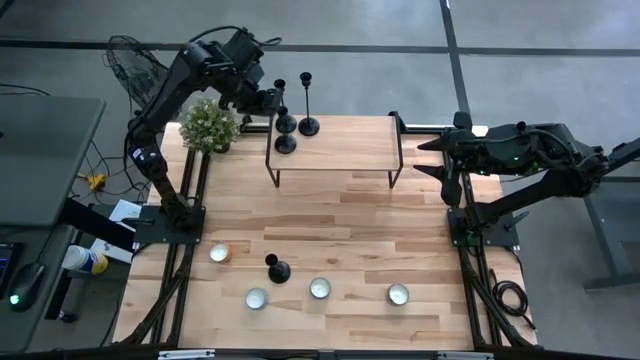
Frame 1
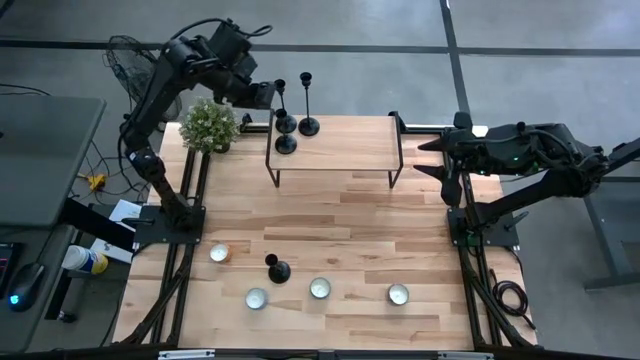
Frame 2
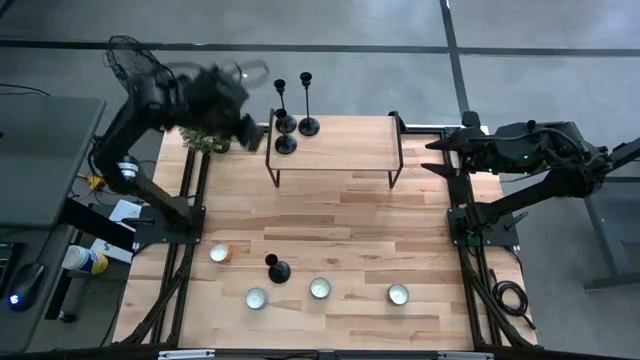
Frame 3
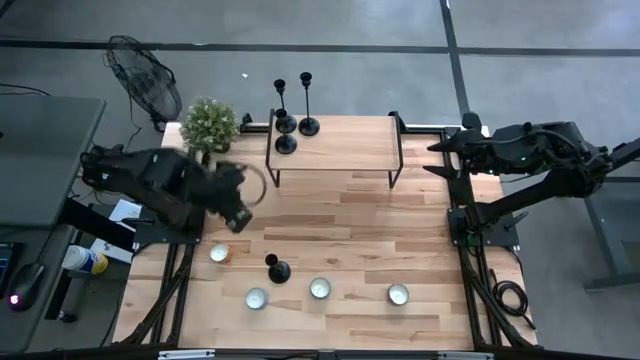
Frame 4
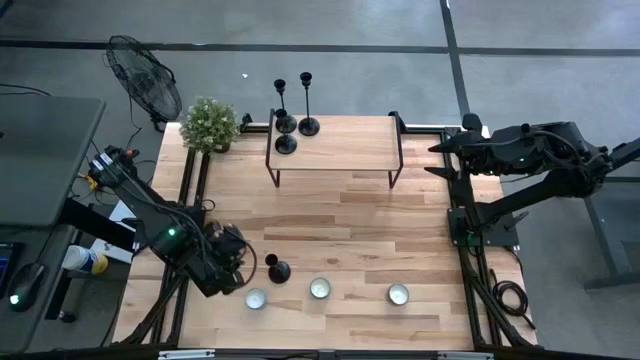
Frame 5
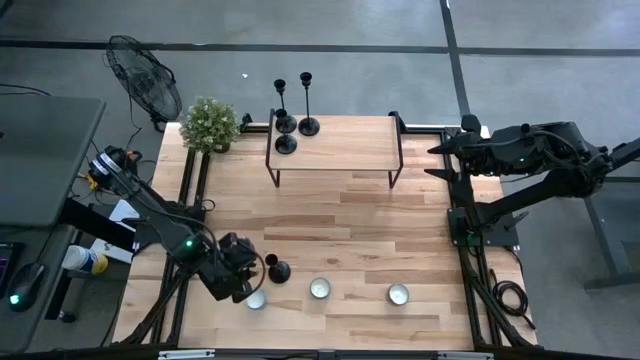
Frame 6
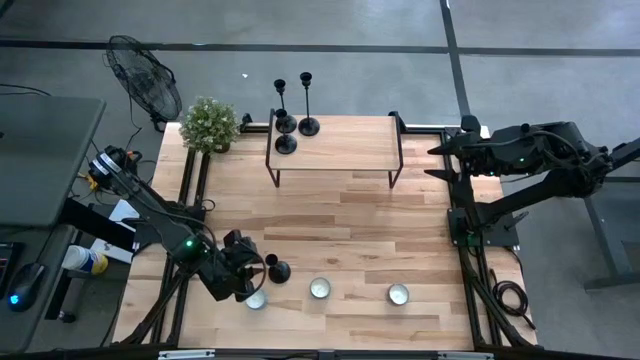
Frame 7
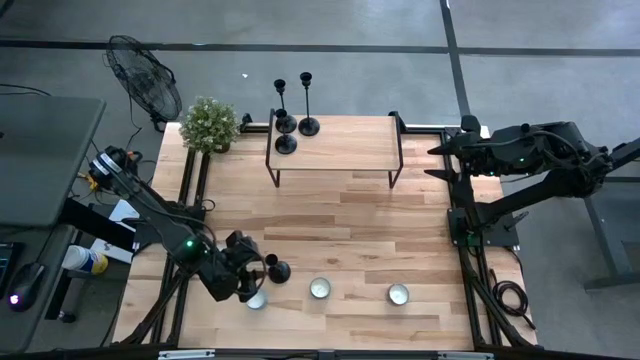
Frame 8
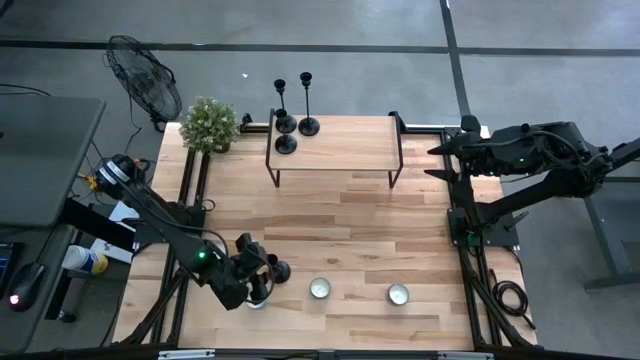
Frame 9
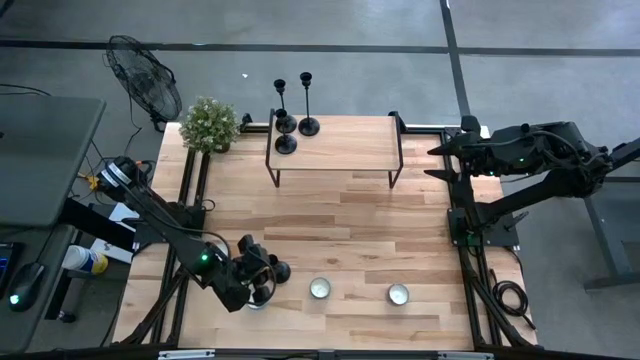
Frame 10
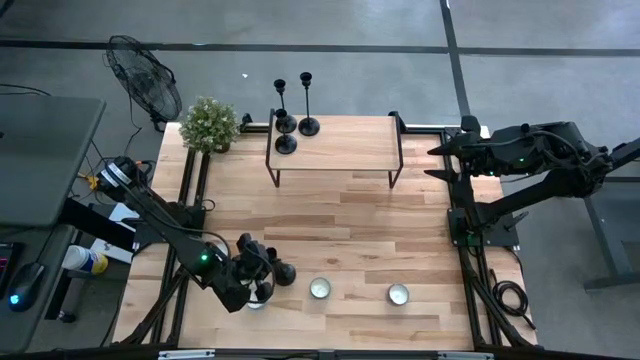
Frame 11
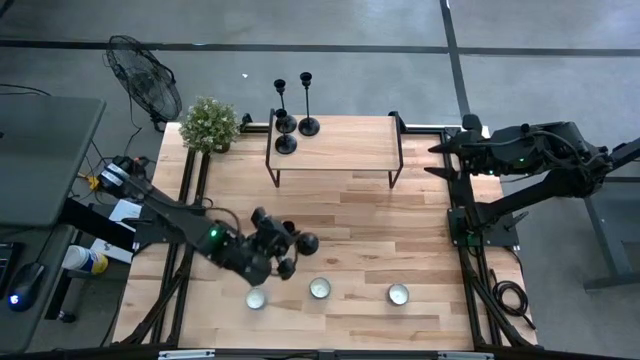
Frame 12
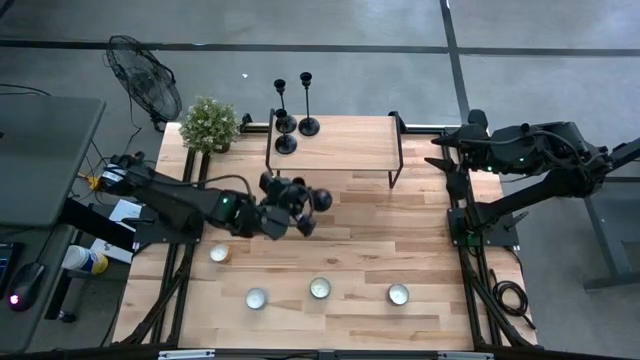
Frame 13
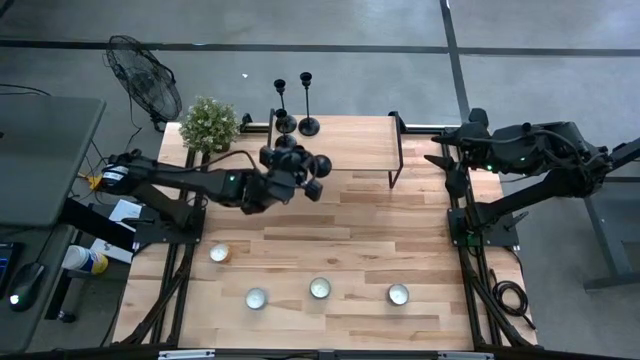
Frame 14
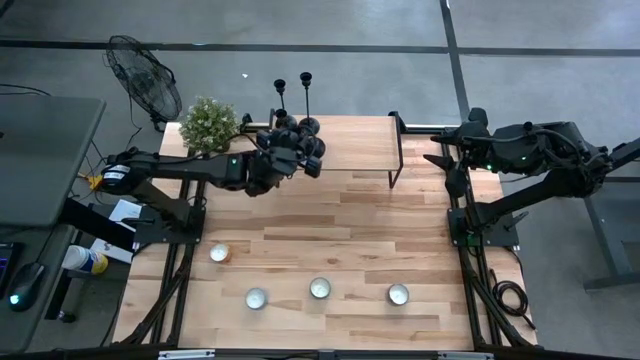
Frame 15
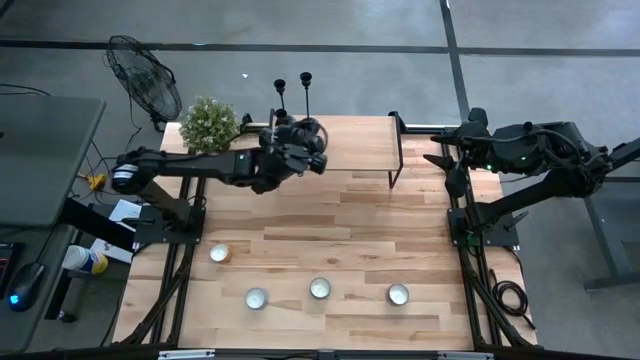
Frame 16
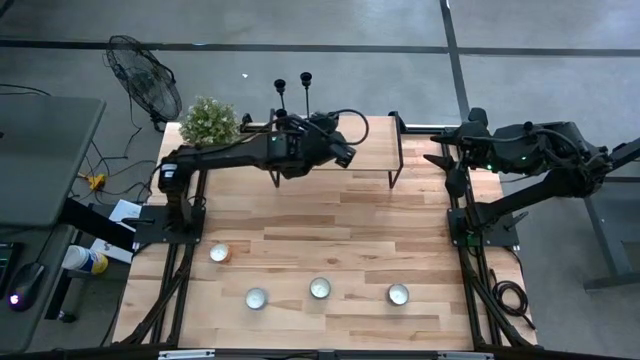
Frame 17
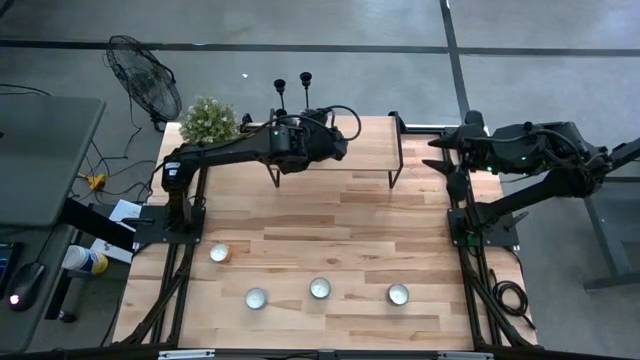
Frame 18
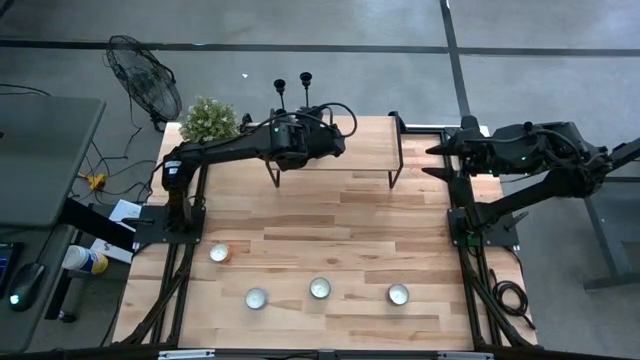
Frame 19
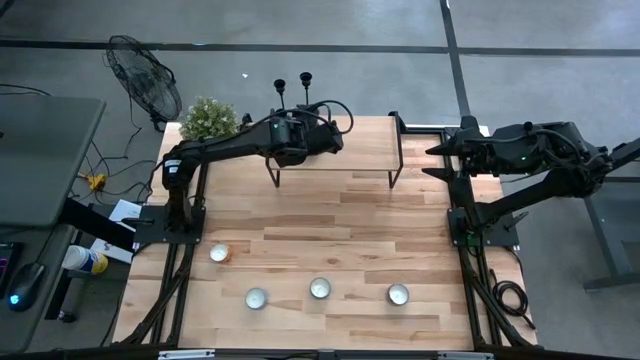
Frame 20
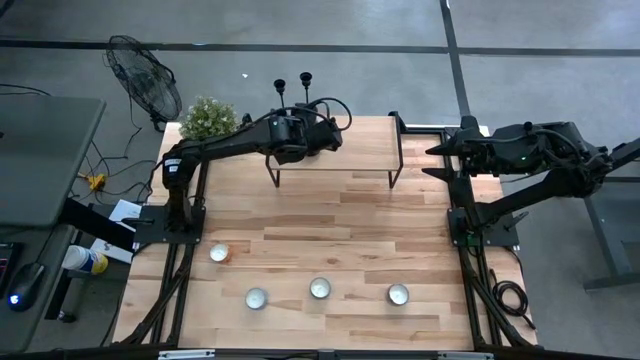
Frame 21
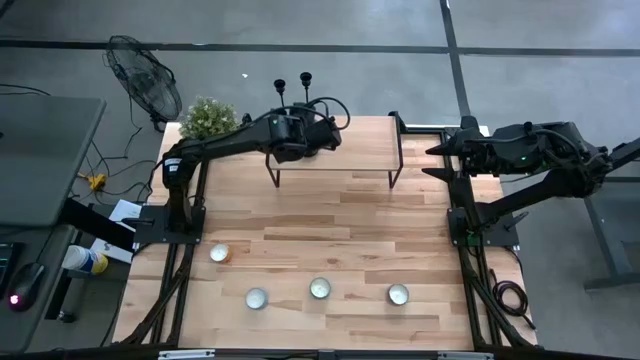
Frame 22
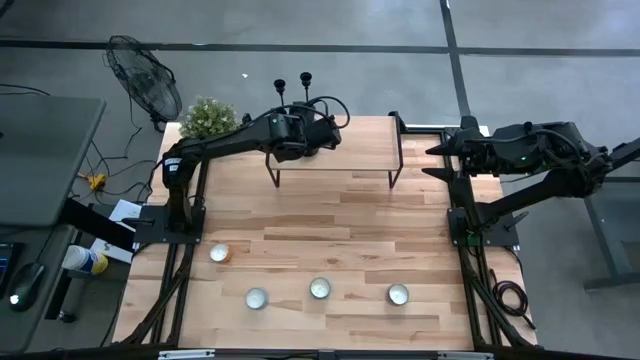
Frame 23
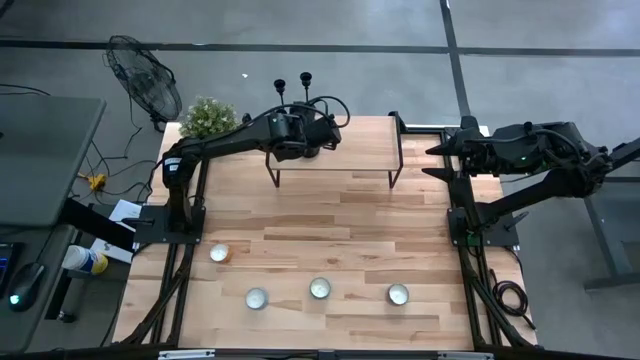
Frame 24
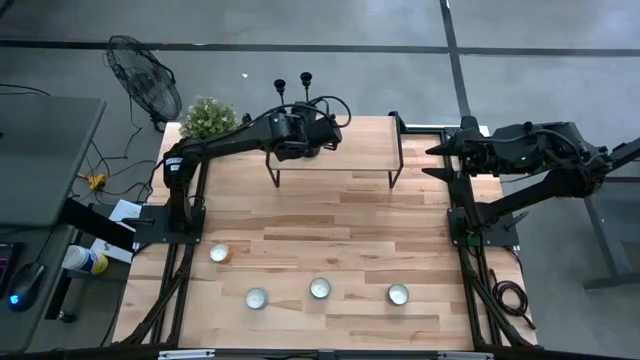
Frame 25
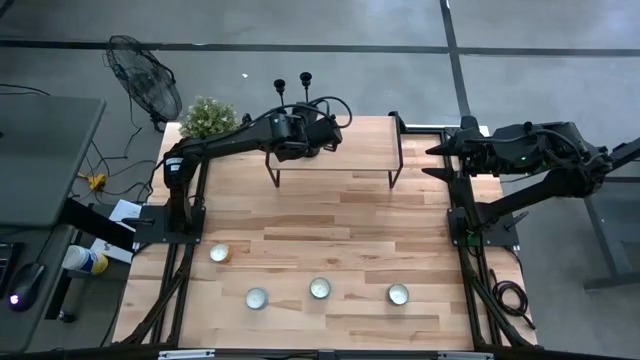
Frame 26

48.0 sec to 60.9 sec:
Task: Pick & Place candle stick holders
Put the black candle holder on the shelf

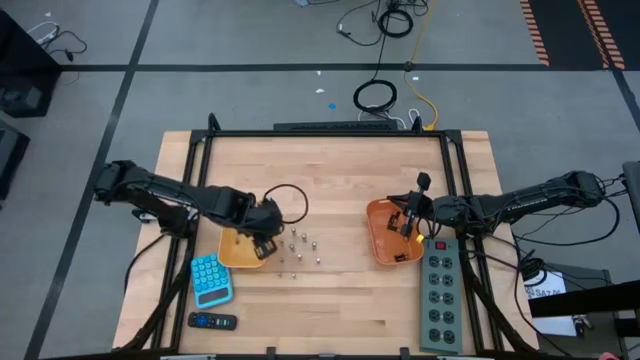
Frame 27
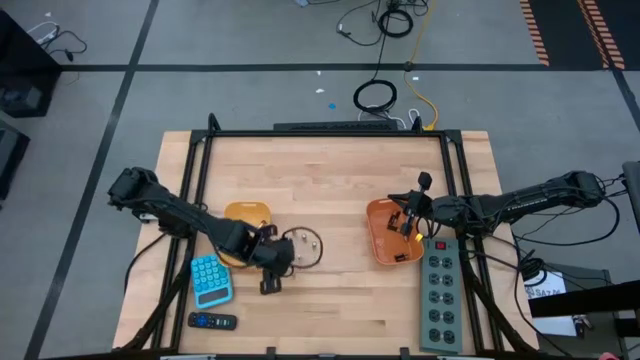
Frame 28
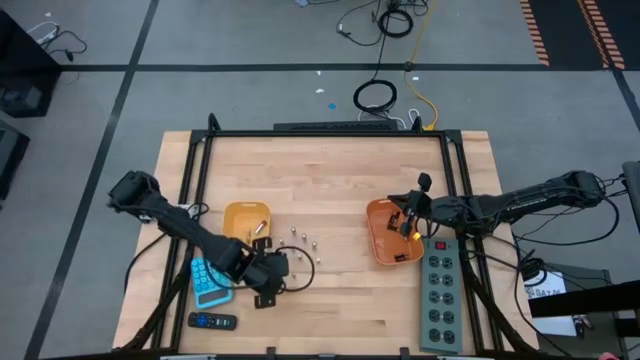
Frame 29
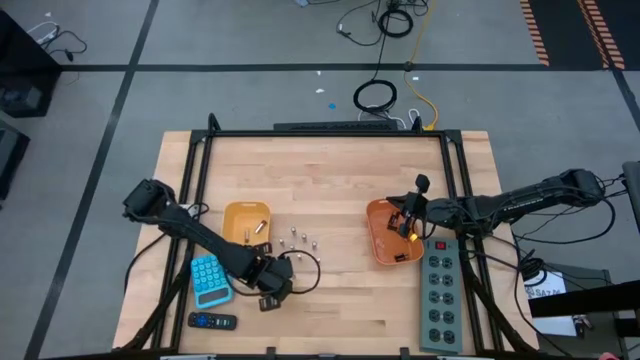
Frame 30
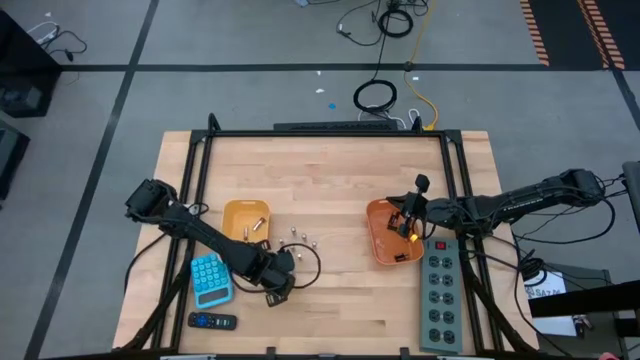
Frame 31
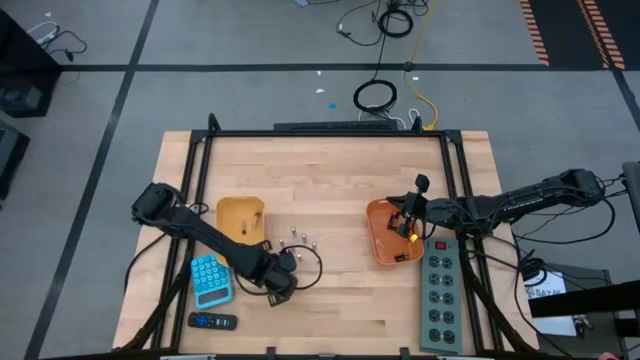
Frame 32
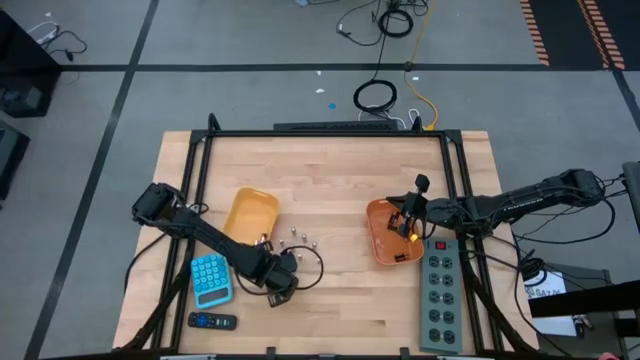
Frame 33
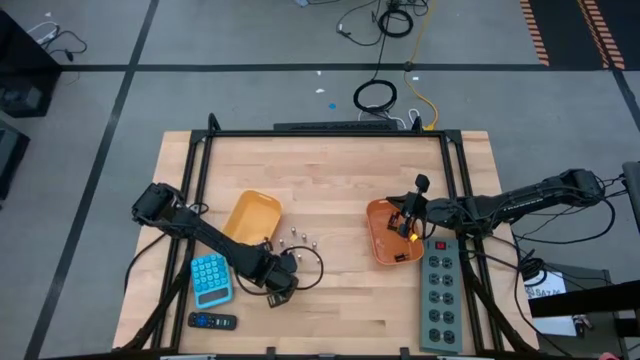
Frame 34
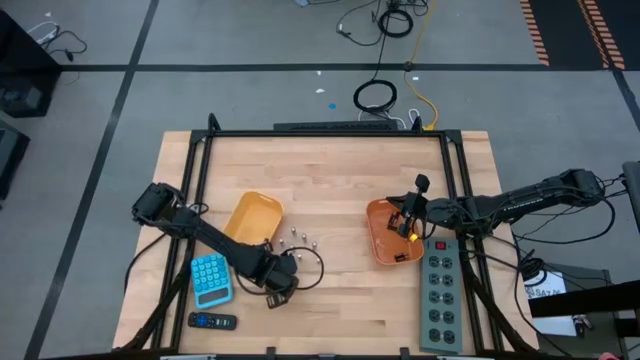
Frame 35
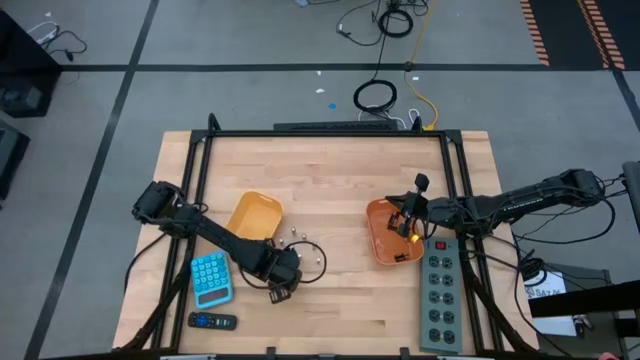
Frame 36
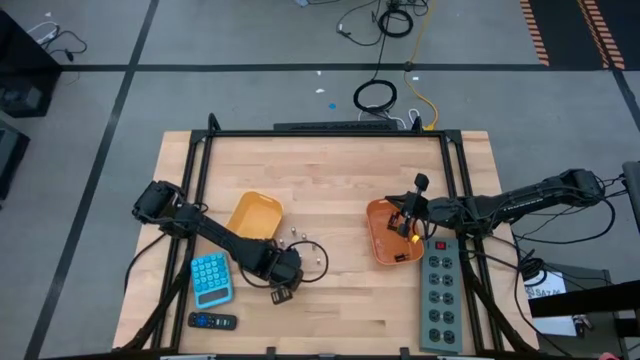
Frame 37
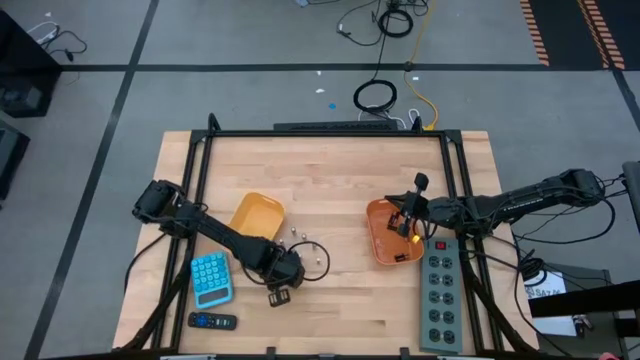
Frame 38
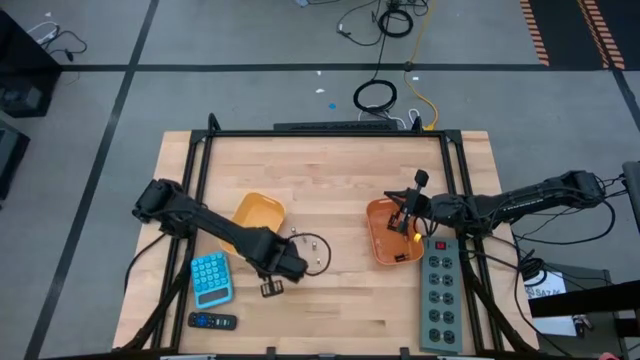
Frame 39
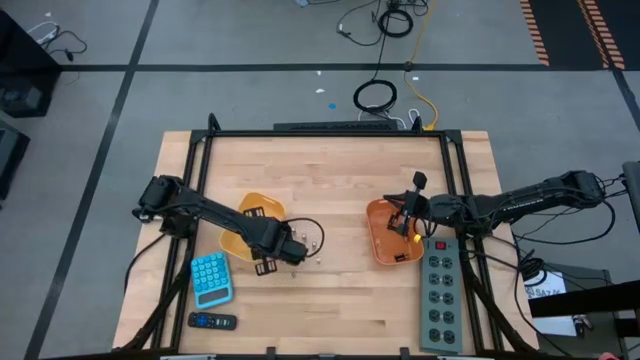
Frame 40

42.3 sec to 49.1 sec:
Task: Sort batteries
Put the silver battery into the yellow bin

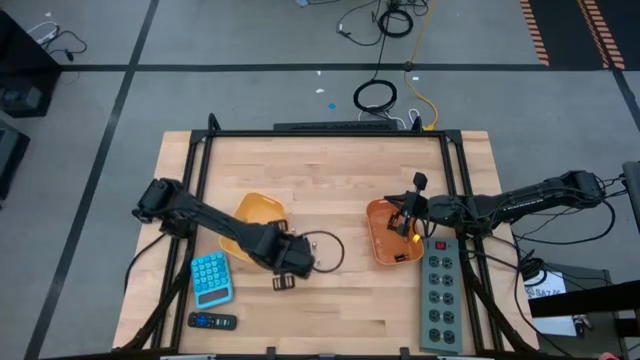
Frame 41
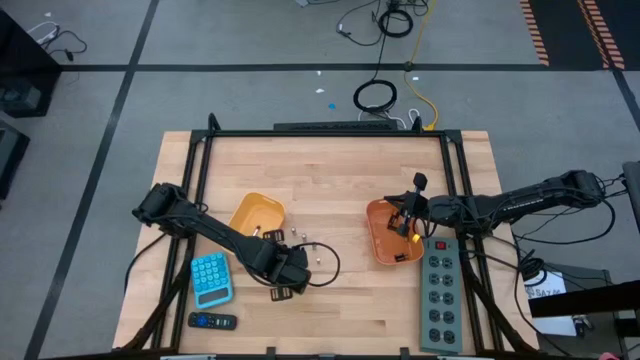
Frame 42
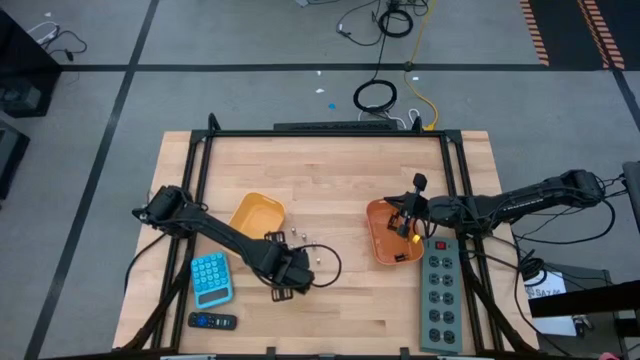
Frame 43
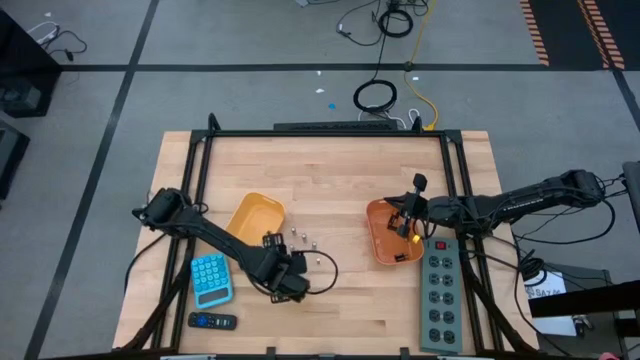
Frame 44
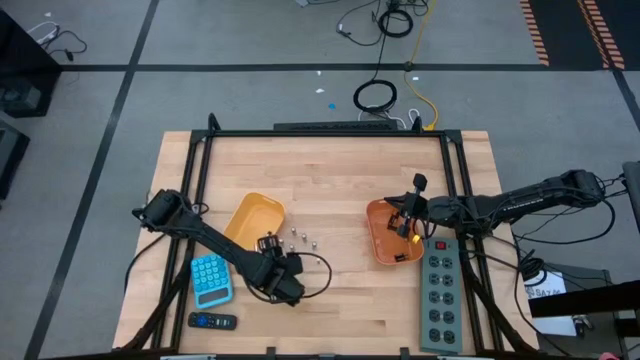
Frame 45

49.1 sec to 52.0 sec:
Put the silver battery into the yellow bin
